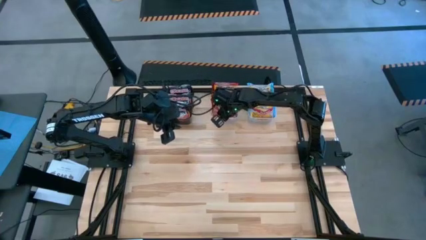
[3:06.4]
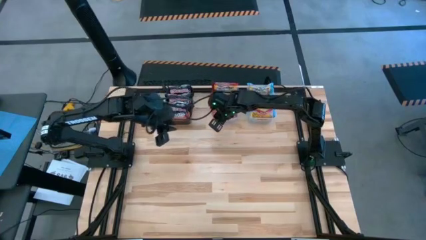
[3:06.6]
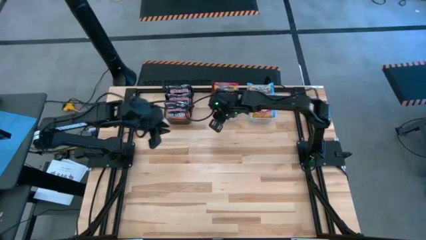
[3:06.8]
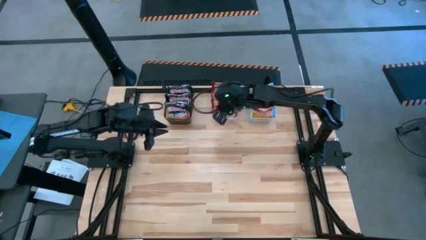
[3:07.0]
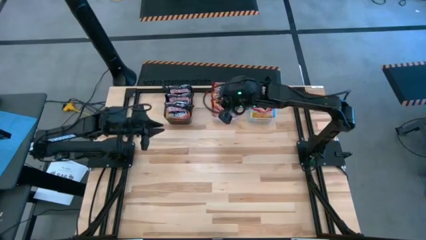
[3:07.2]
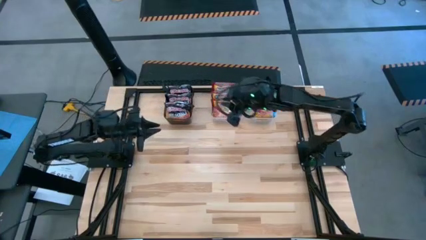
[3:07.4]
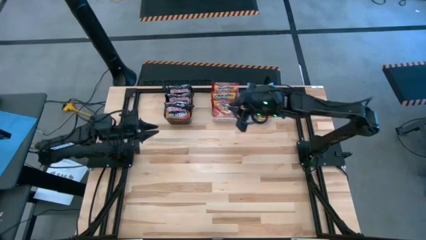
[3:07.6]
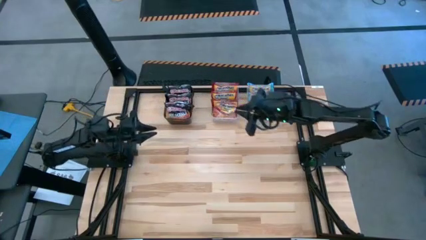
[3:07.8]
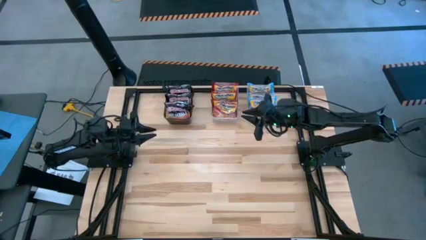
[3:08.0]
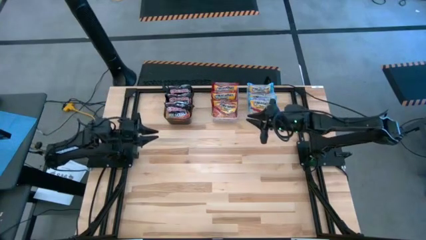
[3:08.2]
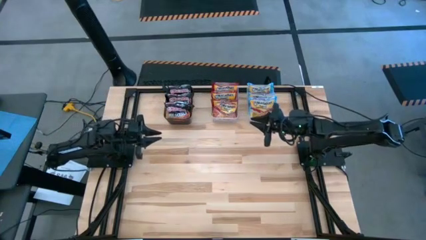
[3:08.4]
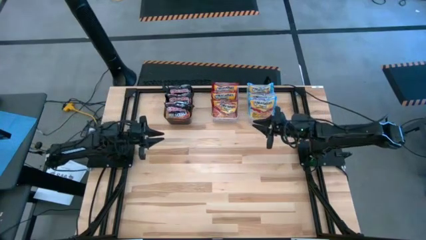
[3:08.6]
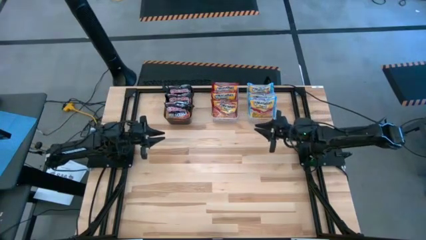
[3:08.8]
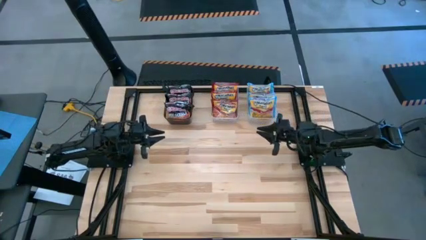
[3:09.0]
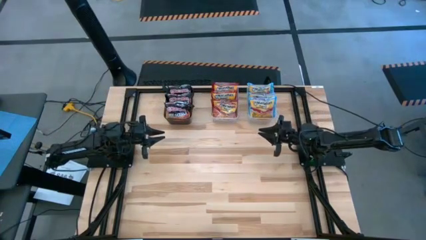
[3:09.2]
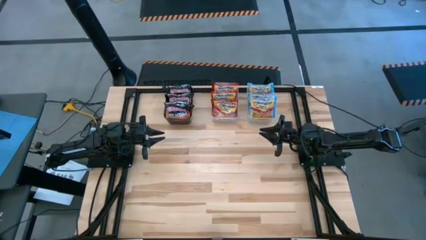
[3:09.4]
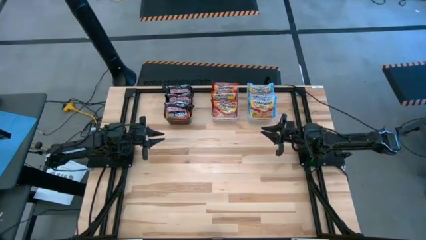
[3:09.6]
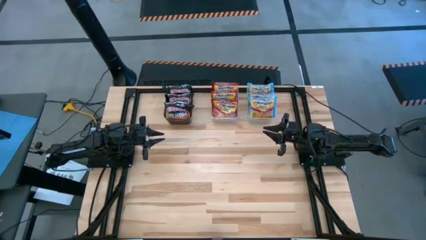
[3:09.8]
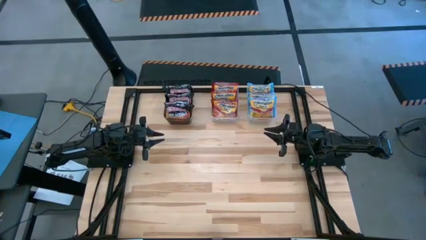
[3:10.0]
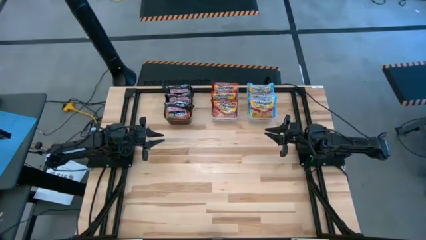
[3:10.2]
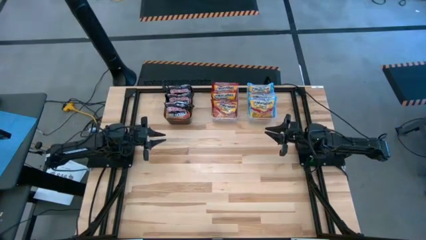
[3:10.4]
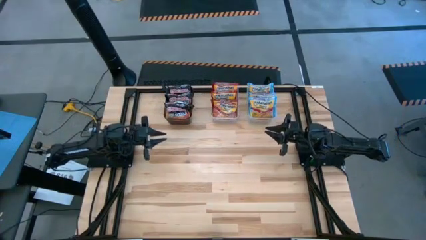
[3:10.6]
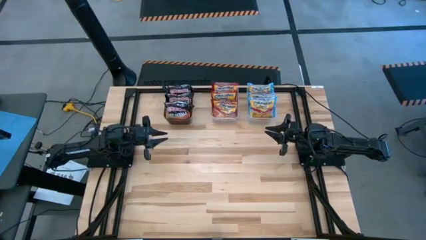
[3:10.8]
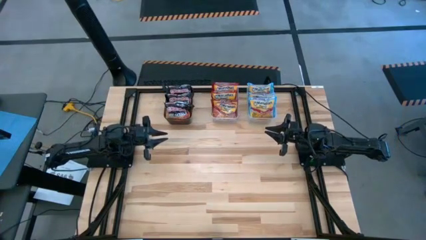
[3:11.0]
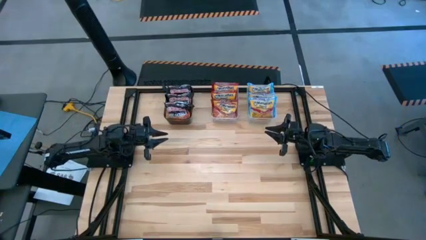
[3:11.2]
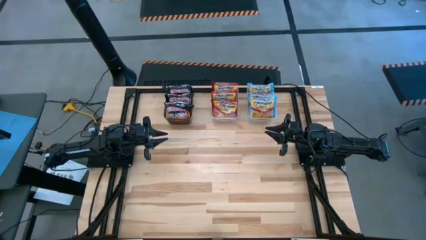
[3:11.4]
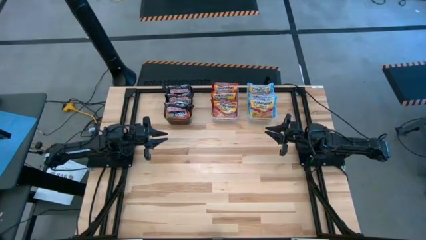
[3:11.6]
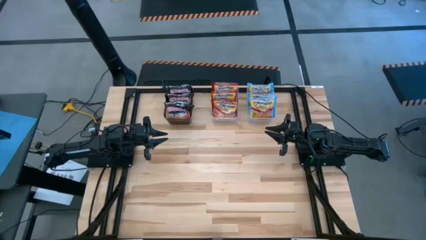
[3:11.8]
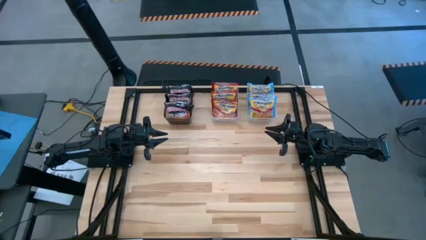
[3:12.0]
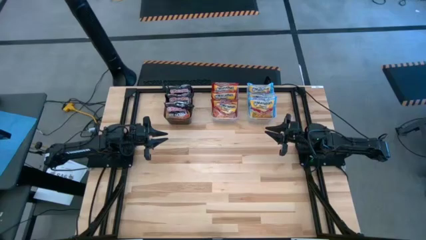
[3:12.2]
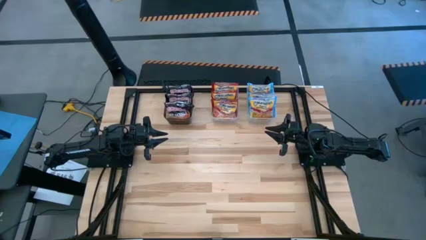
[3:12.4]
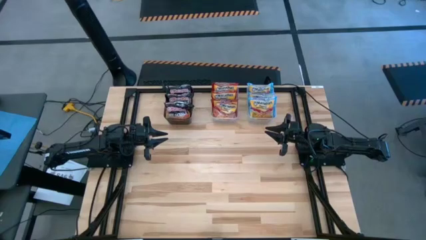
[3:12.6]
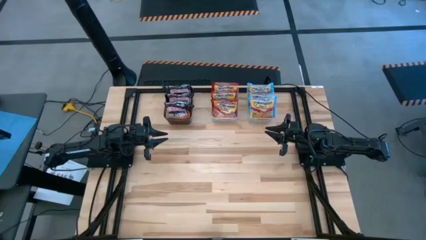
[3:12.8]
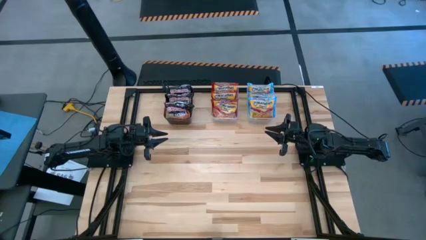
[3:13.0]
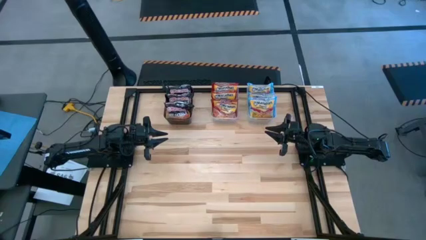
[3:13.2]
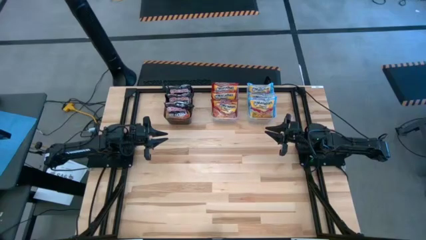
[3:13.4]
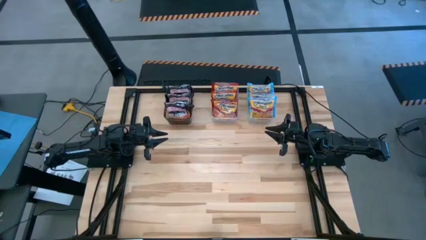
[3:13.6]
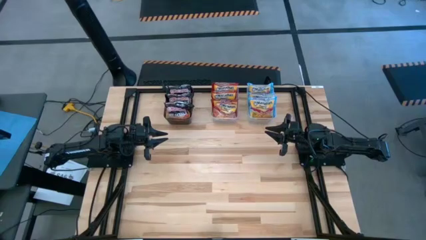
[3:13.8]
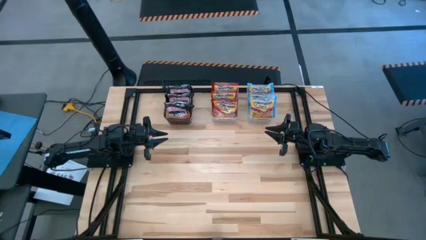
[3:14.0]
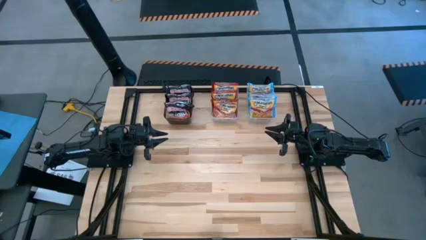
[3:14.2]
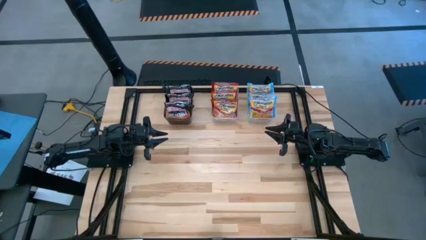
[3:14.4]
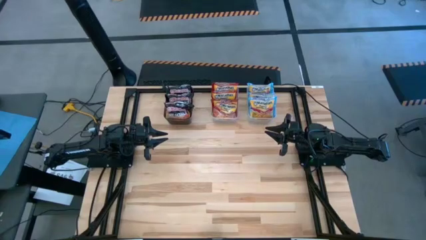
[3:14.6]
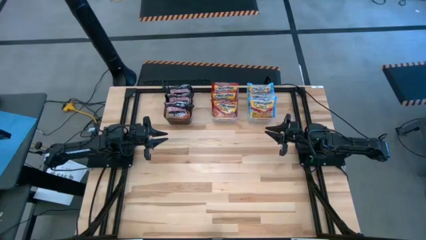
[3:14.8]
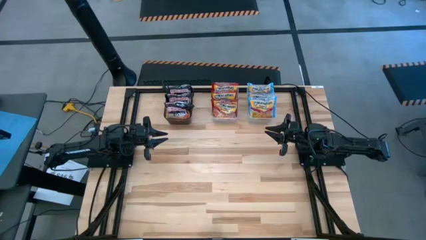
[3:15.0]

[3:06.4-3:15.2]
Task: Sort Maruchan noodles
Return to Home Position
